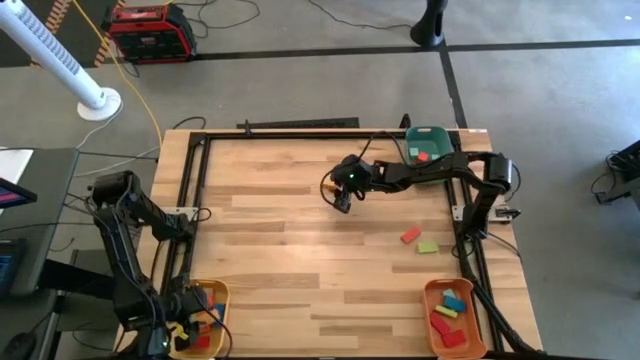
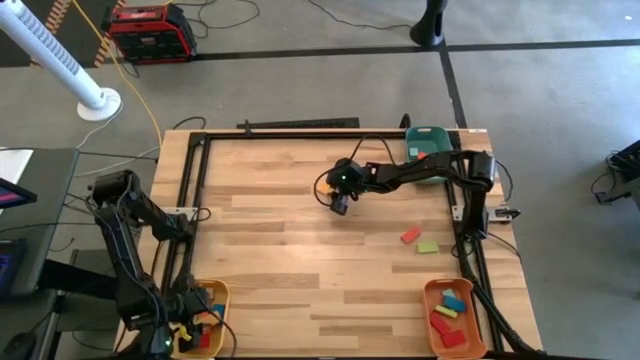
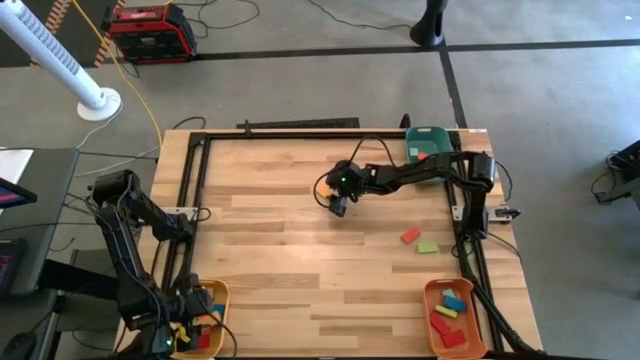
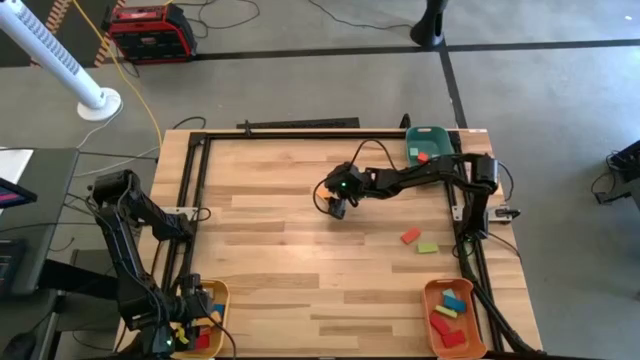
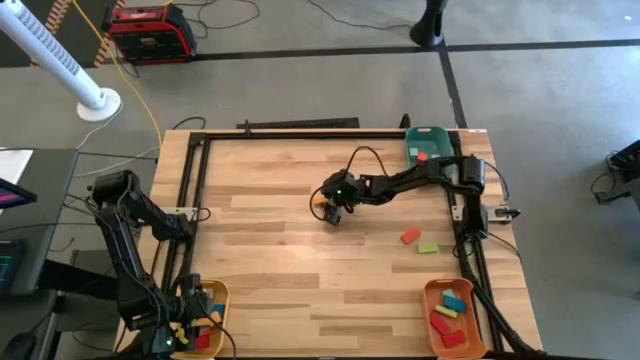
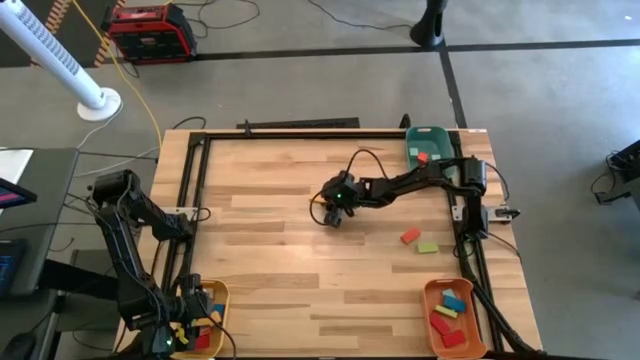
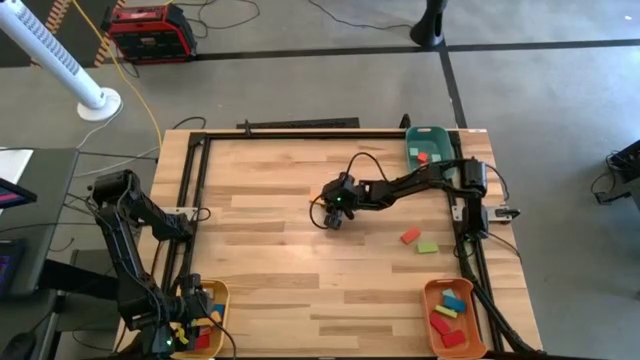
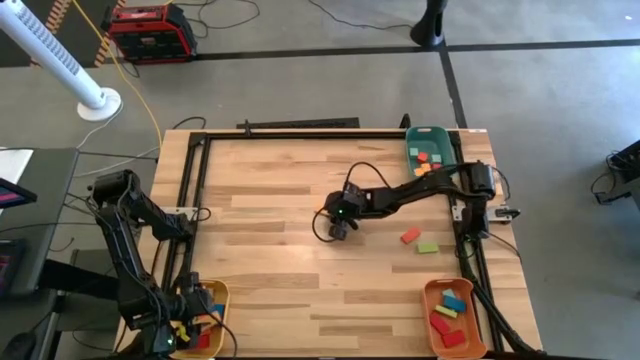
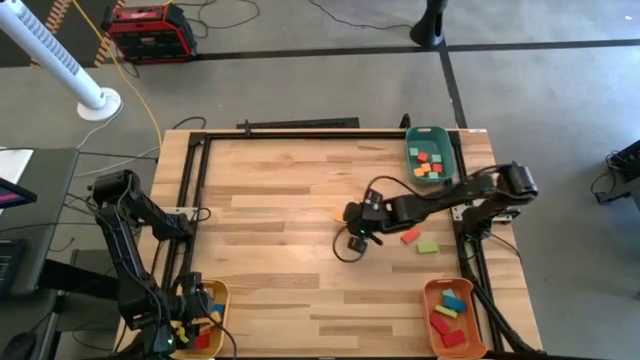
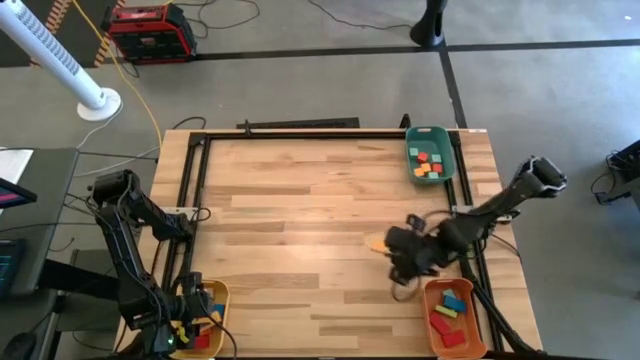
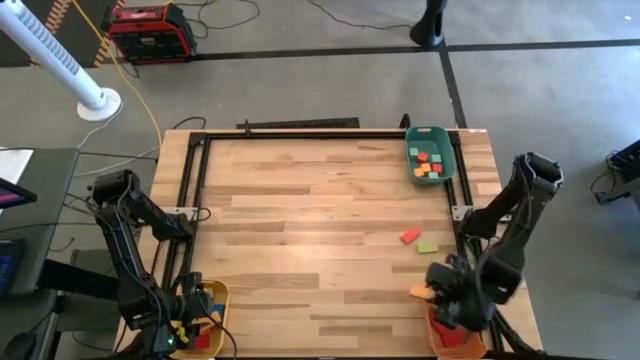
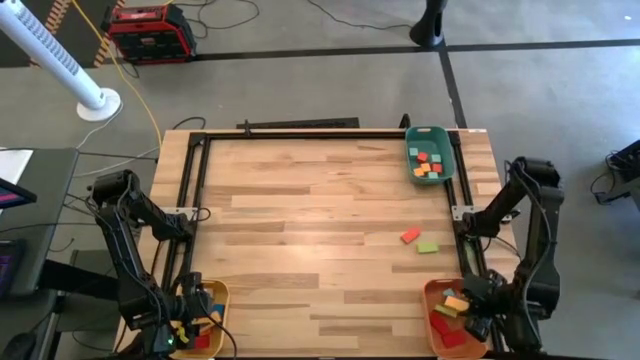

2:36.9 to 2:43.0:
Task: Sort blocks by size
Put the yellow thin rectangle block into the orange bin

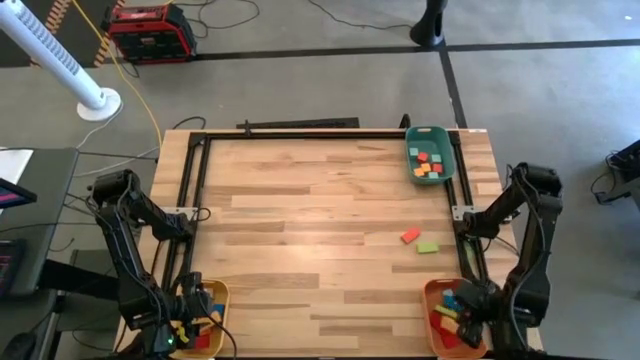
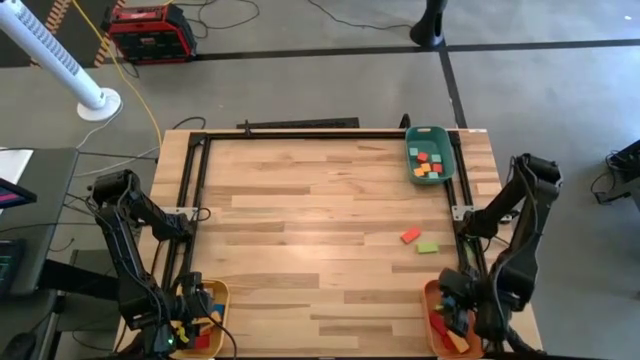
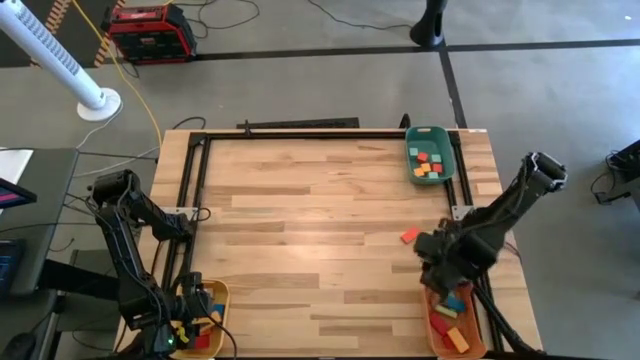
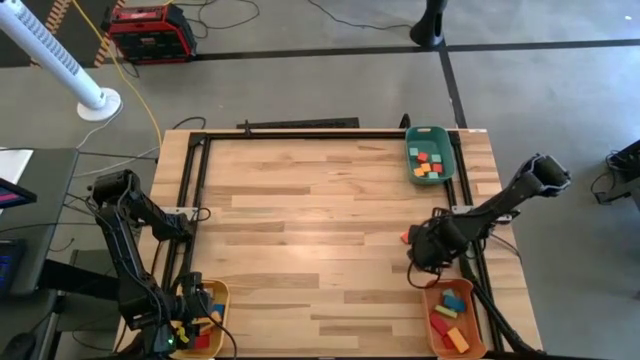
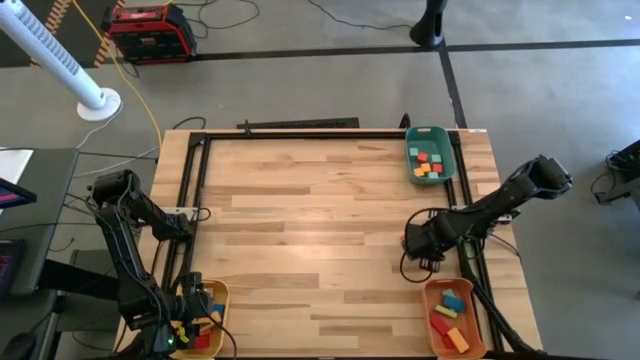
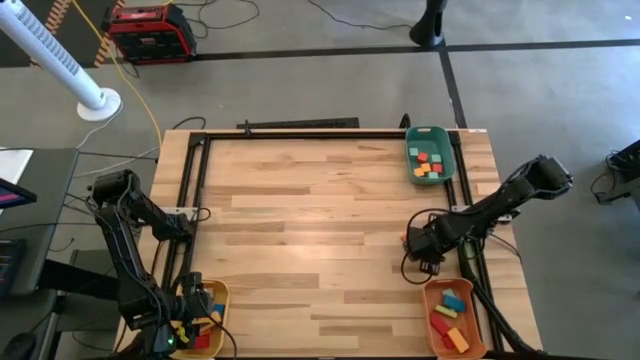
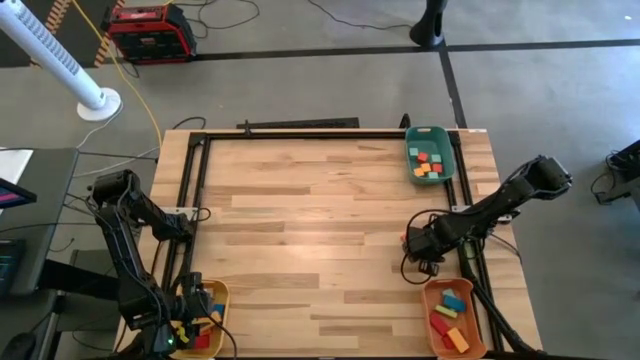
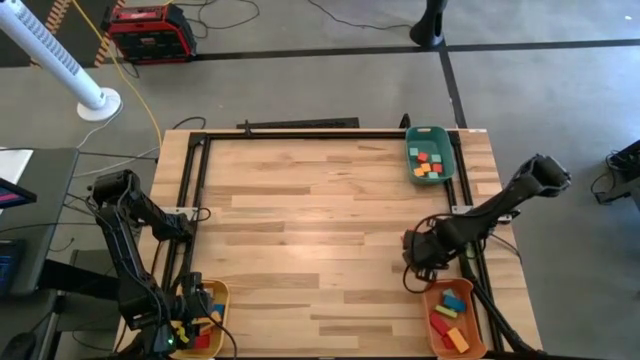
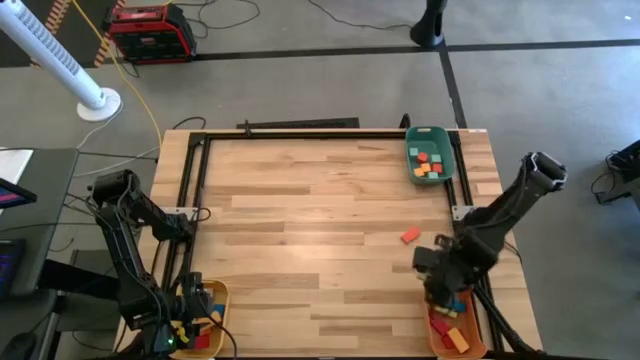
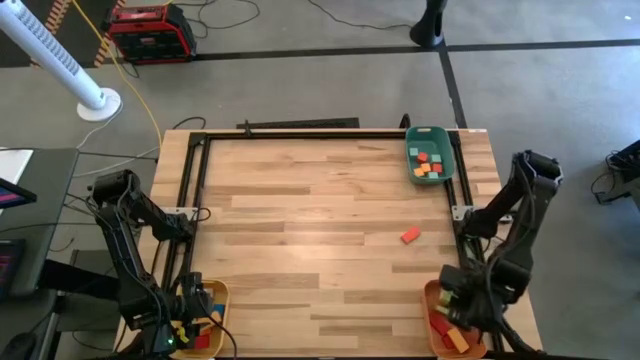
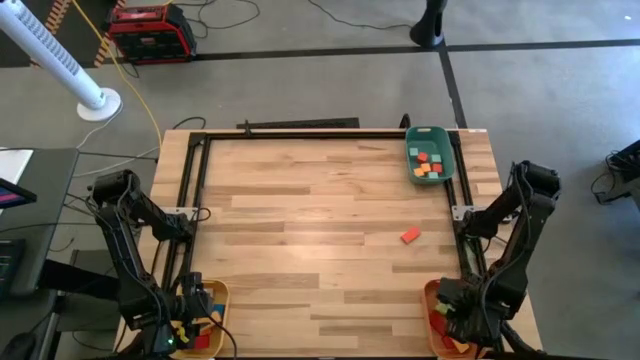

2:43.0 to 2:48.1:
Put the light green thin rectangle block into the orange bin

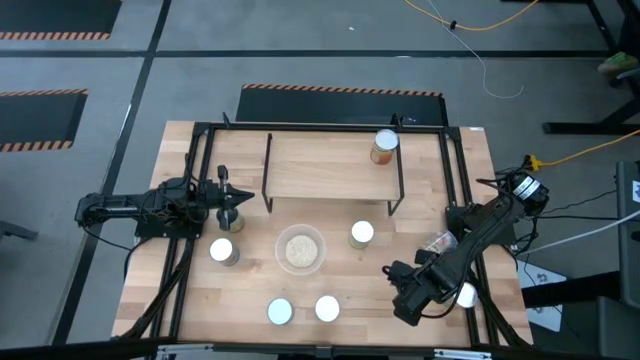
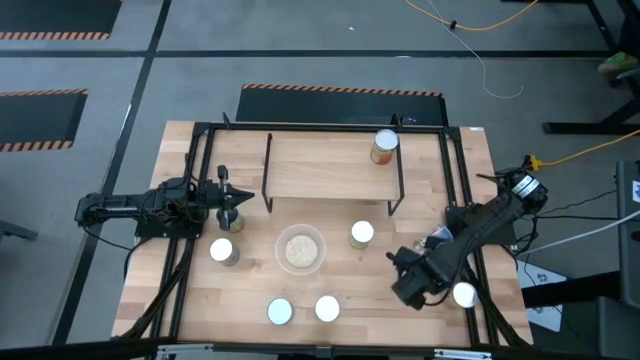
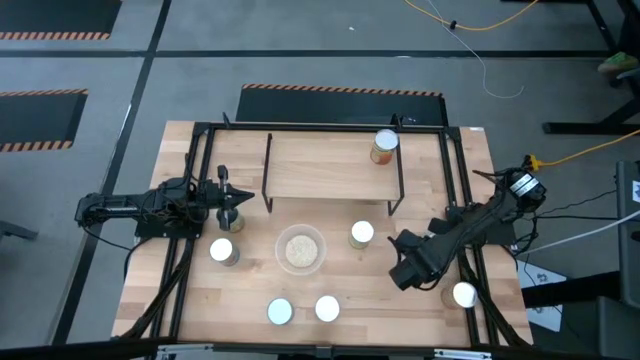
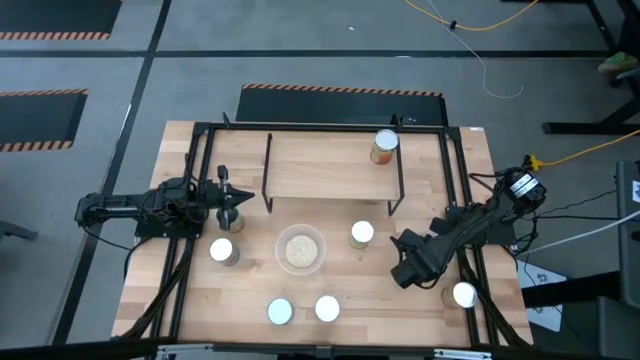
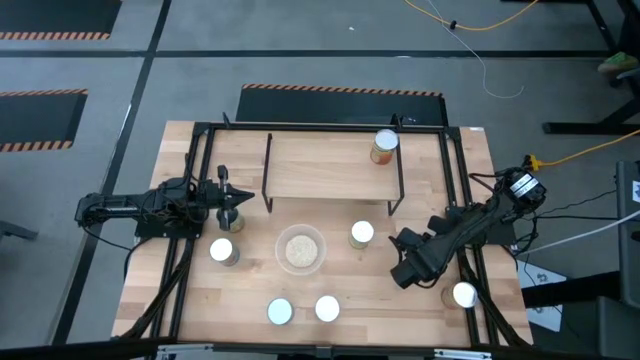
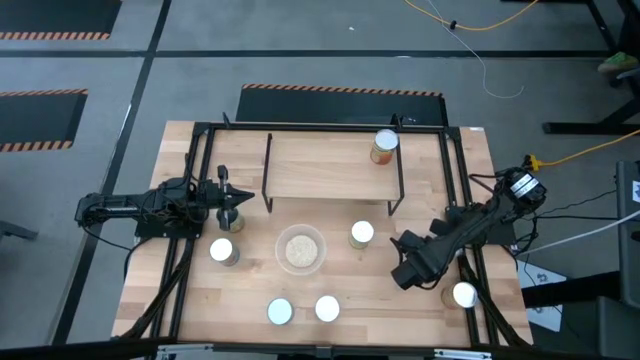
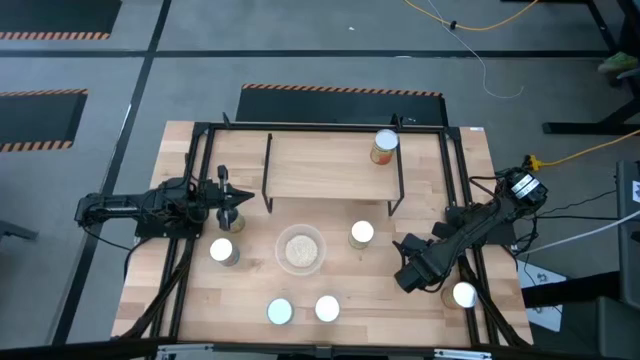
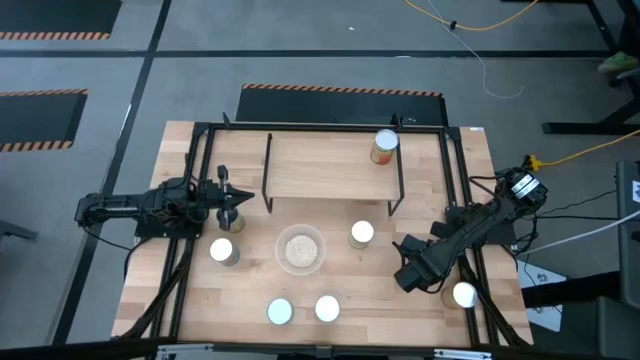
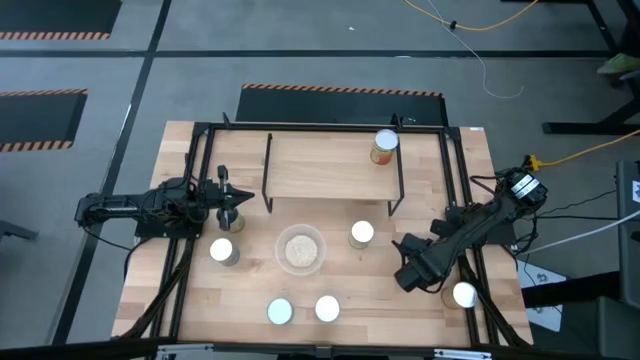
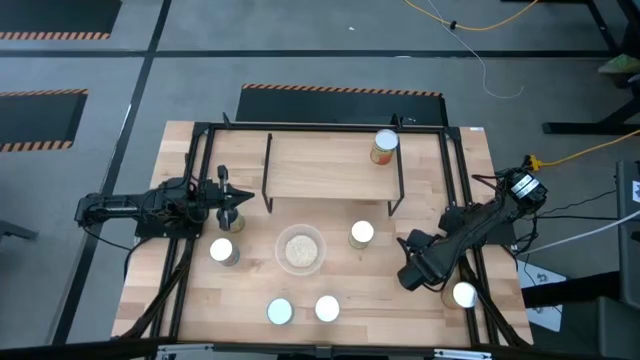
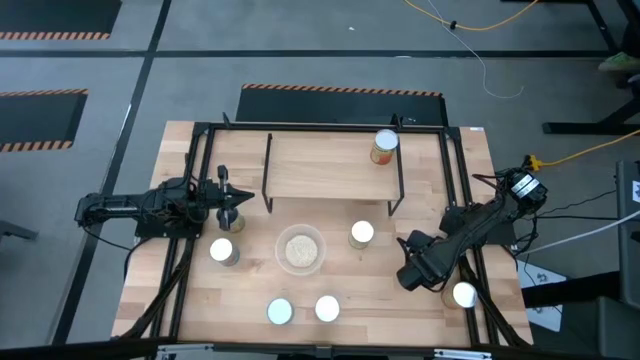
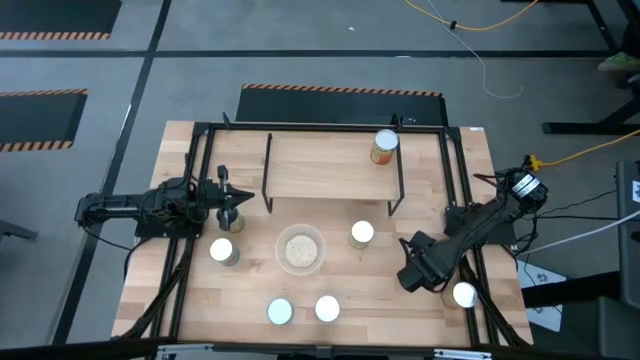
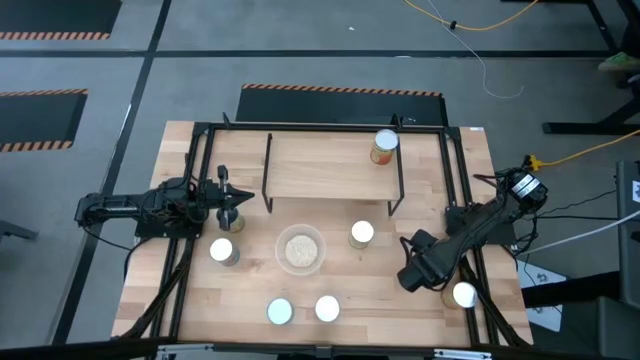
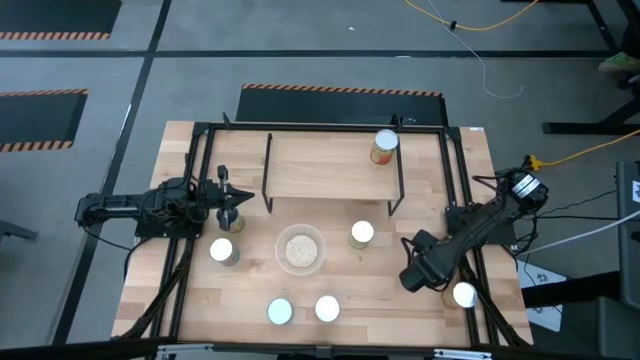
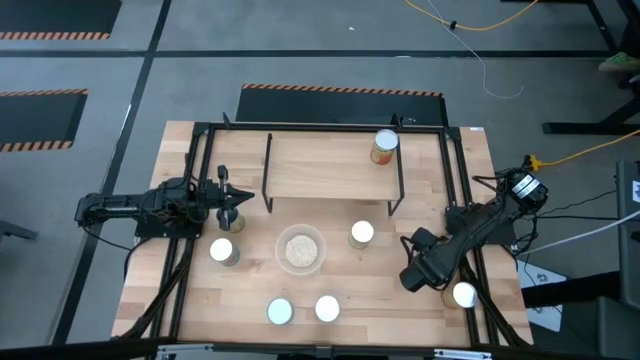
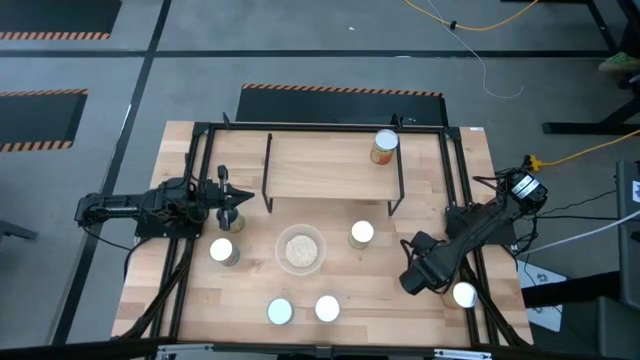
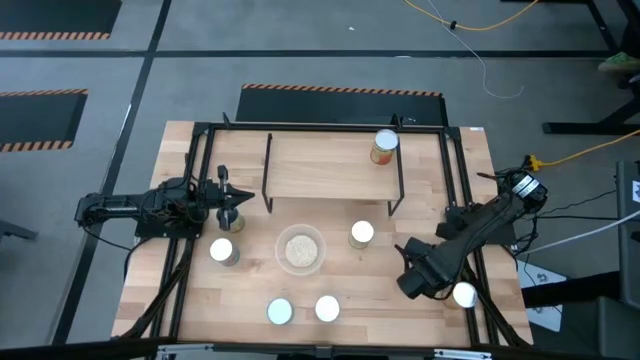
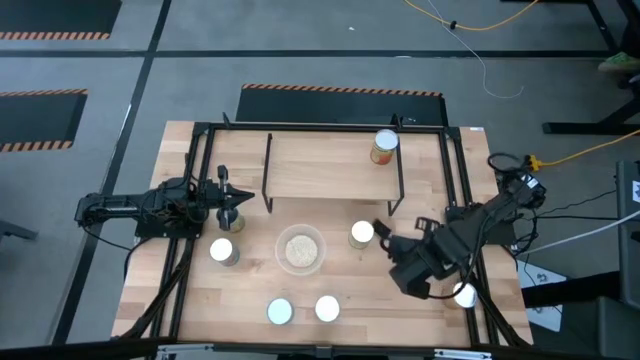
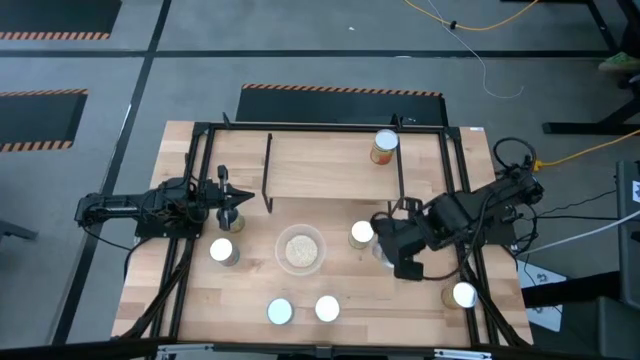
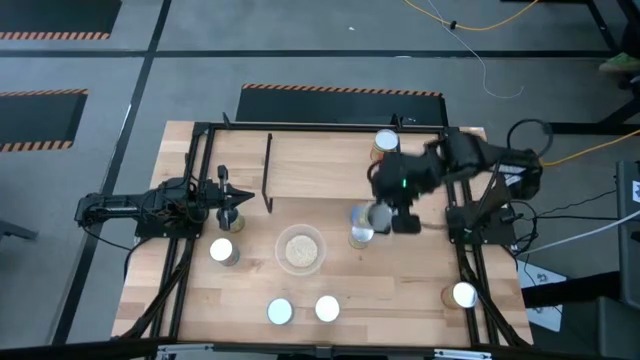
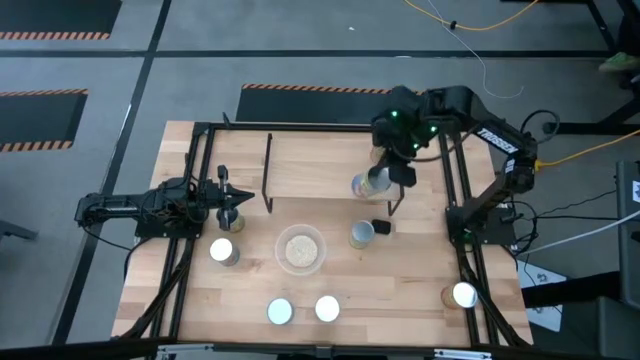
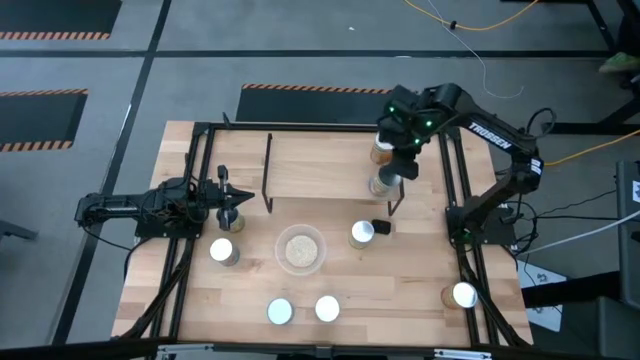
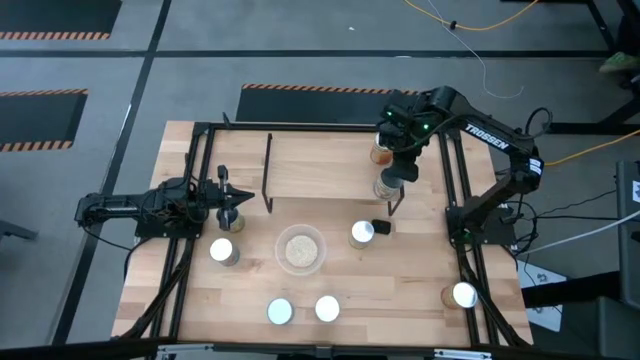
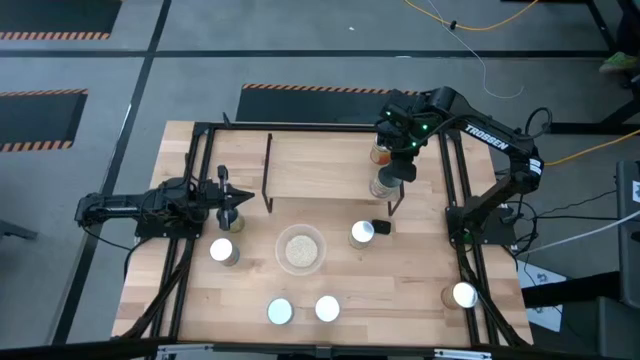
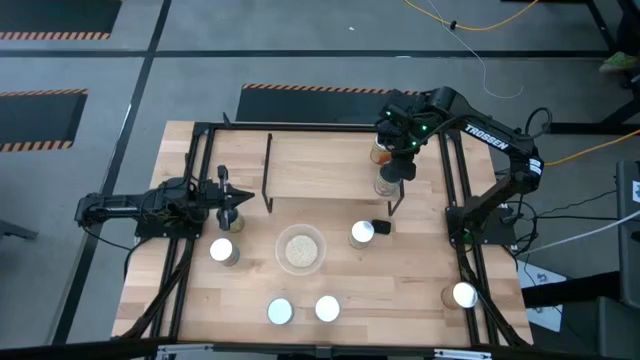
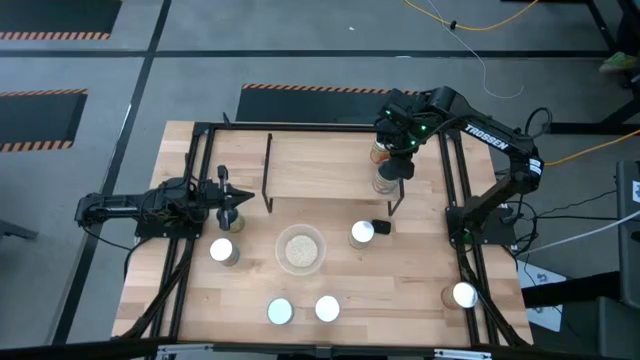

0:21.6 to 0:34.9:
Task: Pick and place cans onto a shelf
Put the canned peaches on the shelf
